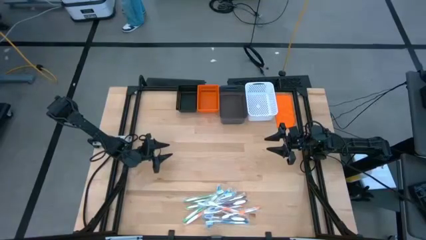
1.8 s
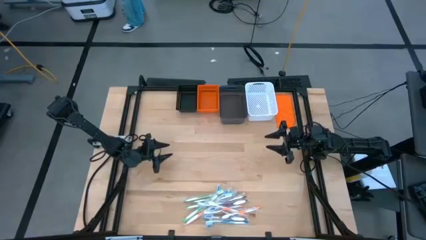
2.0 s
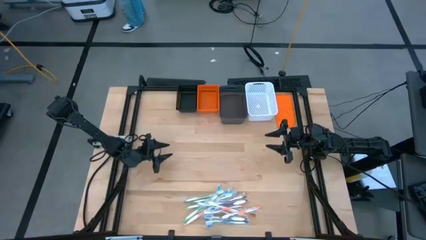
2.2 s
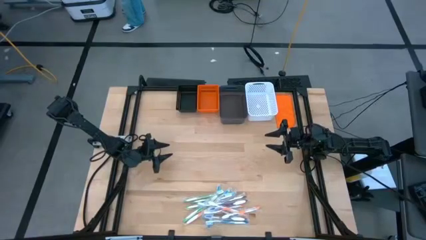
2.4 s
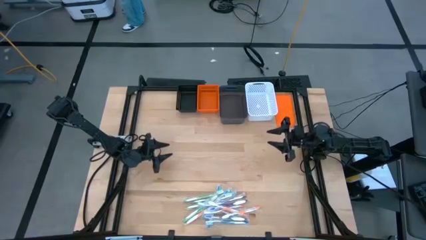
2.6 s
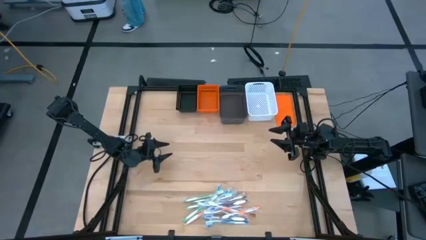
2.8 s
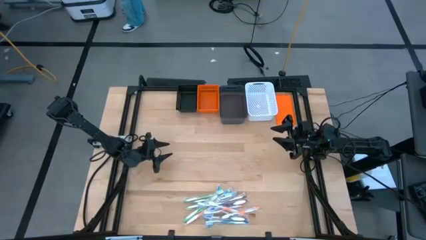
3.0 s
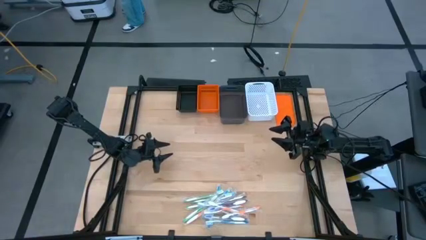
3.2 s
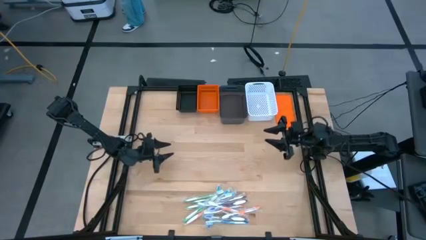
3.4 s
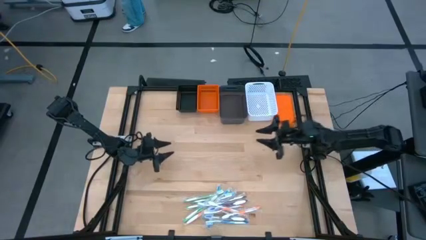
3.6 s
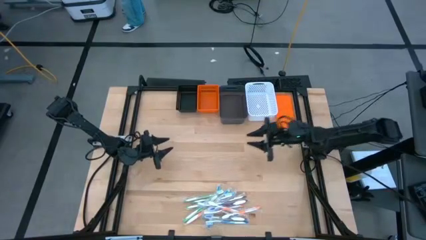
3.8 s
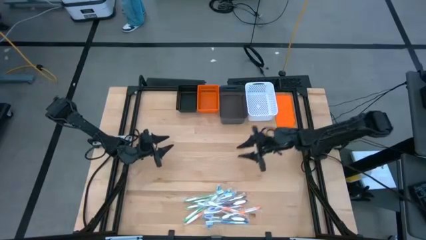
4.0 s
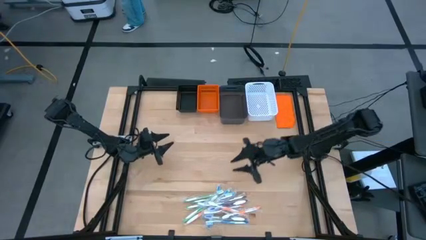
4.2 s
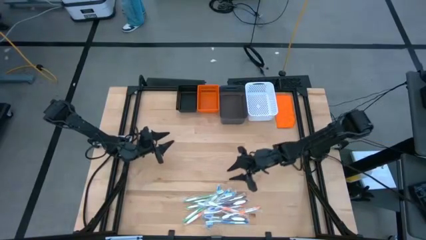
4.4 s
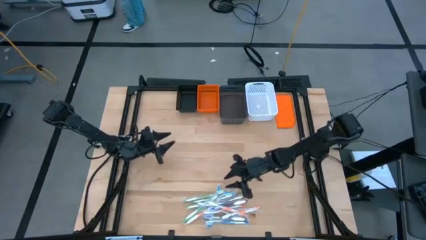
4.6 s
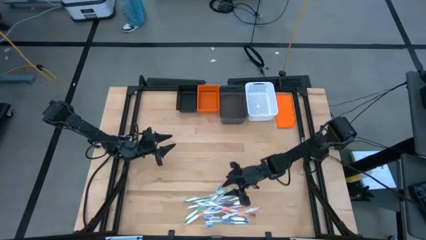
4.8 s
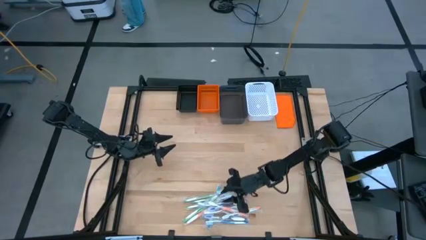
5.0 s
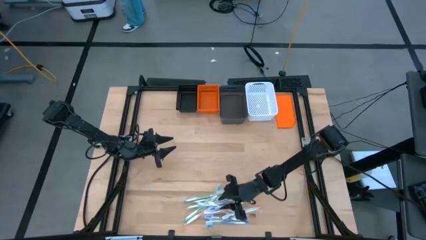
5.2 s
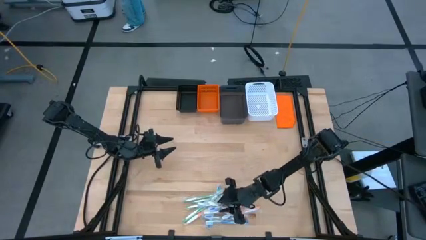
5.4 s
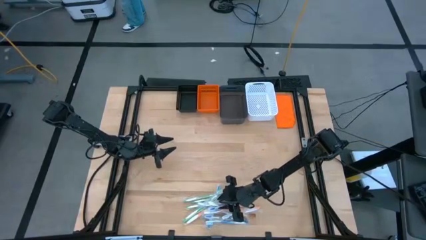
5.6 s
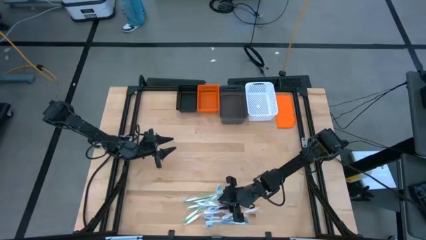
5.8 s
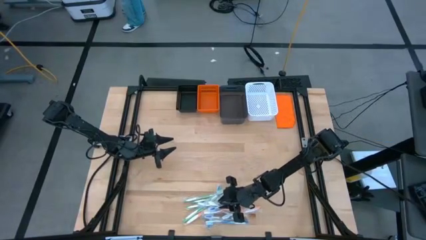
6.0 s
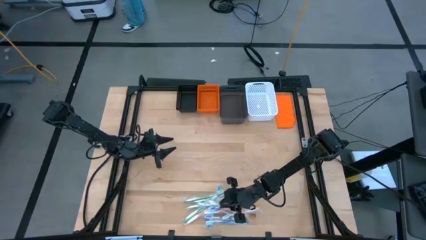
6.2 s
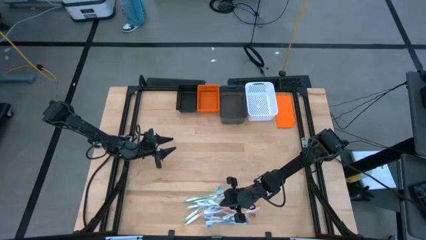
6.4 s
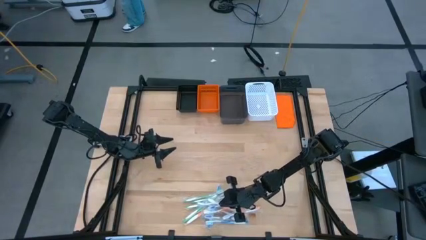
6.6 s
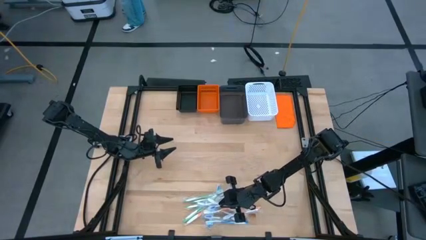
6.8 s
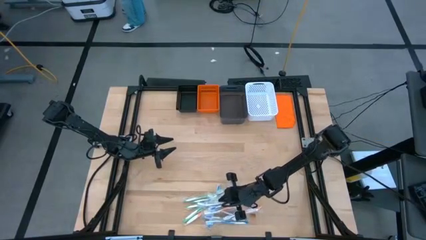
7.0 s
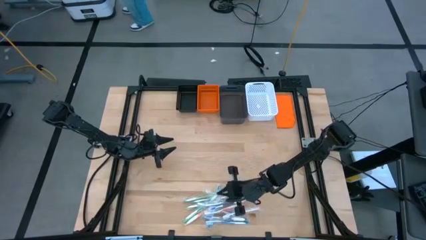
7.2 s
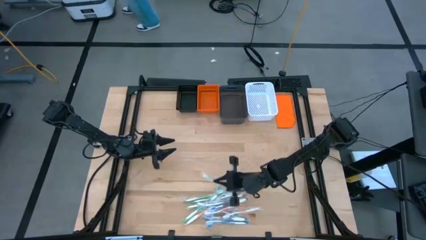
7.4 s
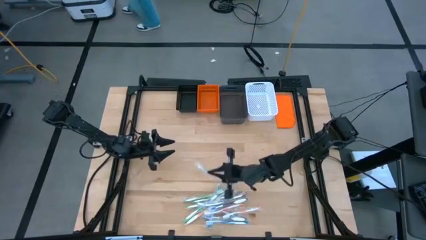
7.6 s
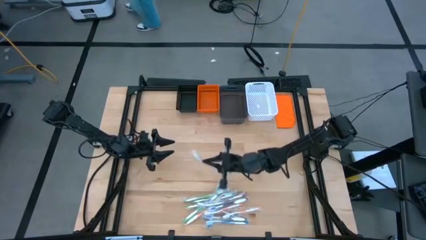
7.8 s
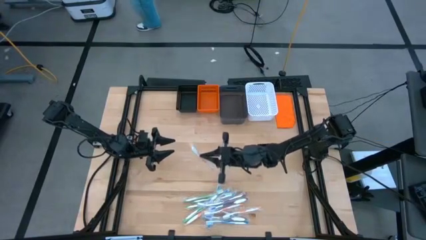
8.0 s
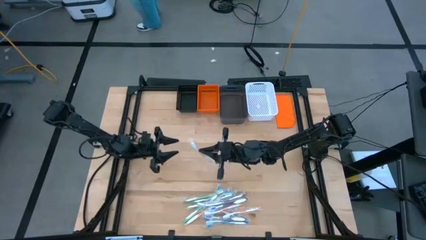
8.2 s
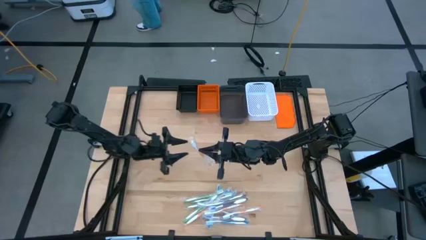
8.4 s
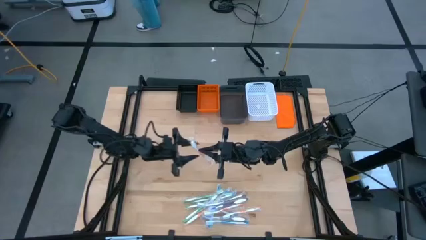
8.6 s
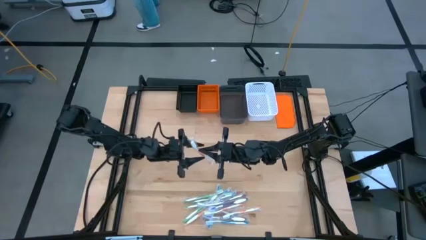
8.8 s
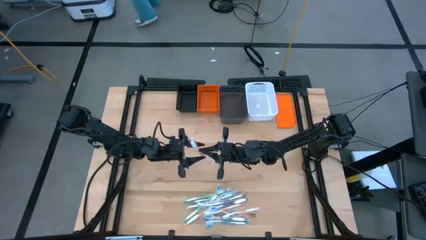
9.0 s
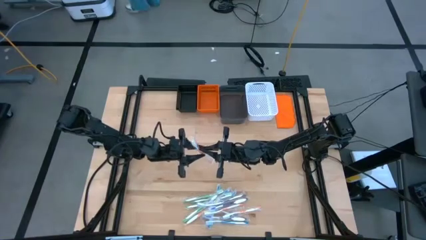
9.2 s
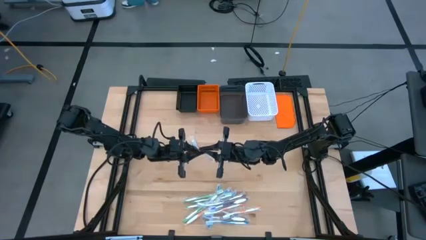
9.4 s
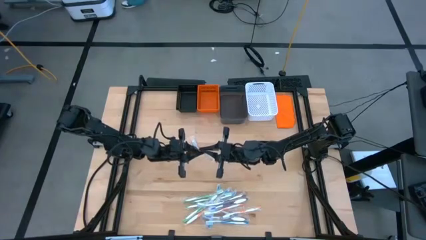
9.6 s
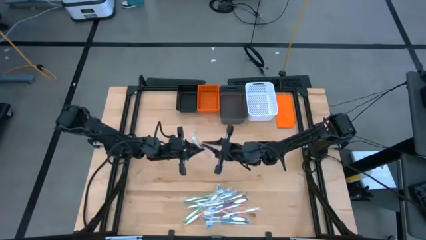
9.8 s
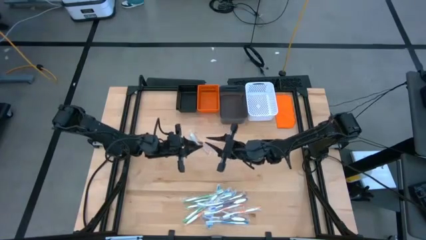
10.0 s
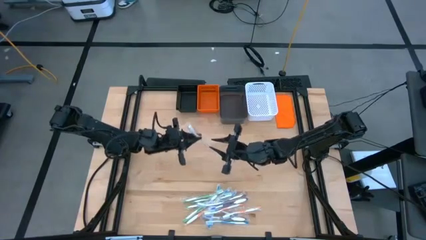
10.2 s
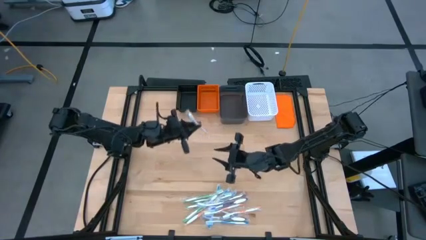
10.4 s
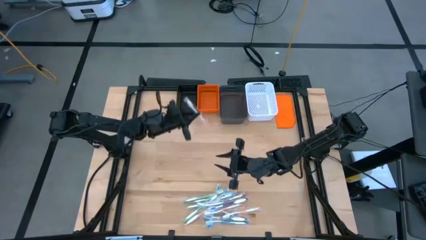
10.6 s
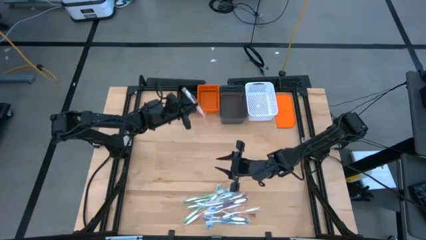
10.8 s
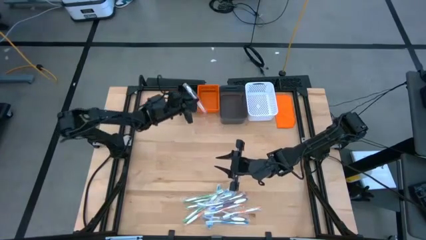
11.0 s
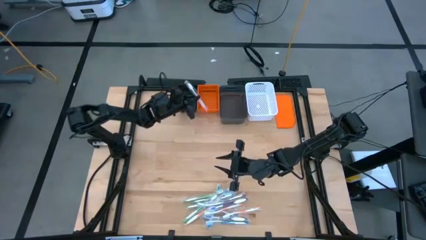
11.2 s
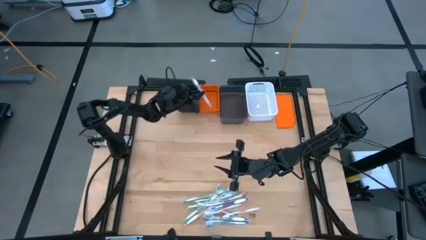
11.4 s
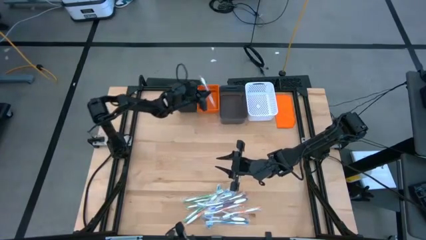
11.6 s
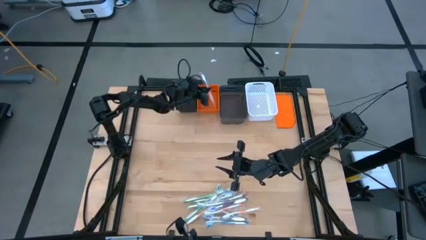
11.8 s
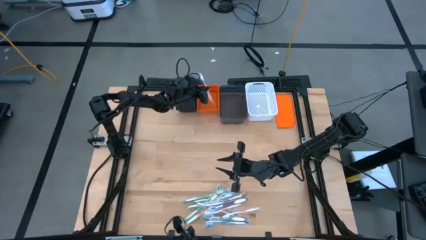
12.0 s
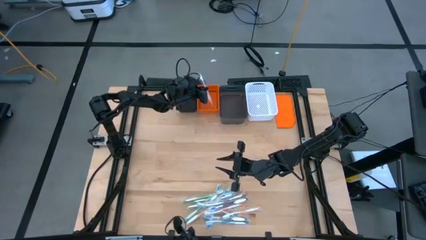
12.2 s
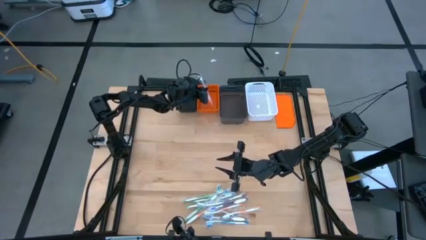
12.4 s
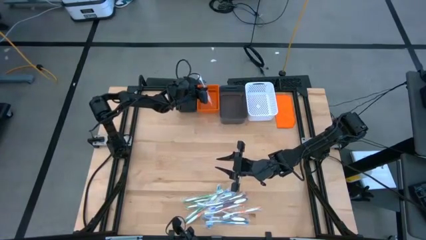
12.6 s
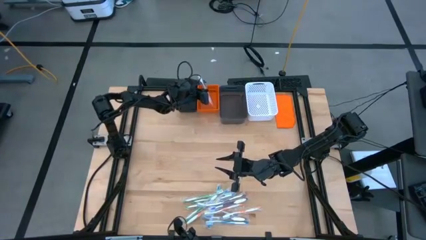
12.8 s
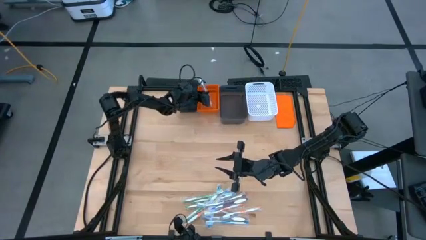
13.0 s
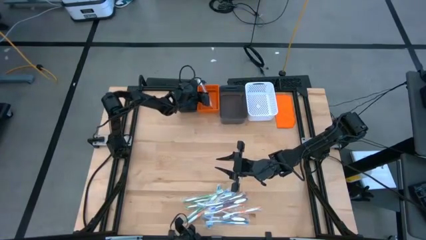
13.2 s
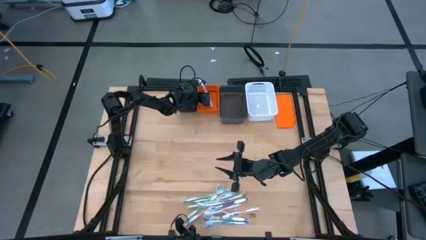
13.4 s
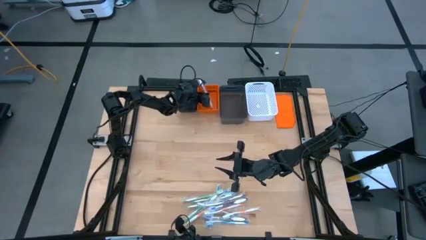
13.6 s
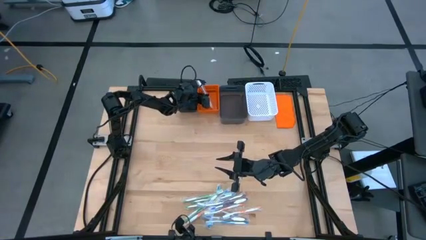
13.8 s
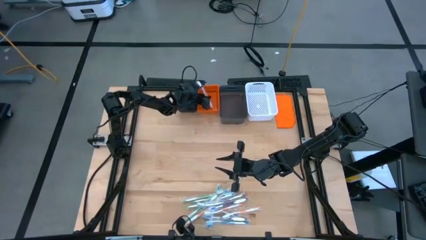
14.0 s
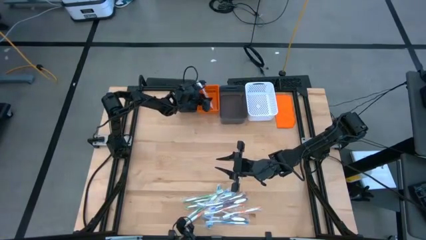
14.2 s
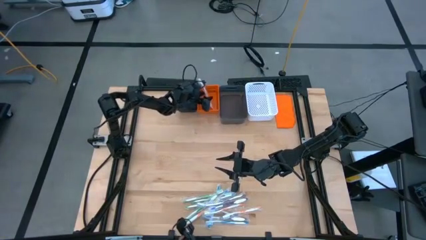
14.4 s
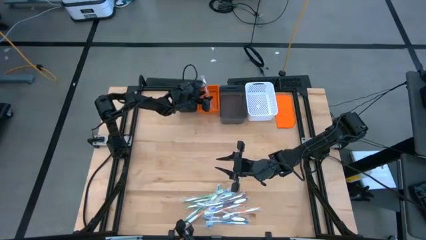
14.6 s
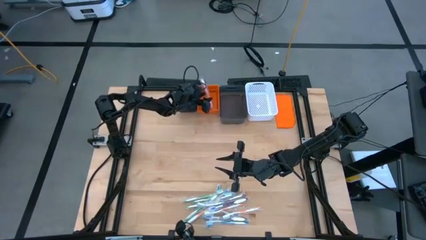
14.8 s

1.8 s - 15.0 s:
Task: Pick & Place Toothbrushes
Put the orange toothbrush into the orange basket
